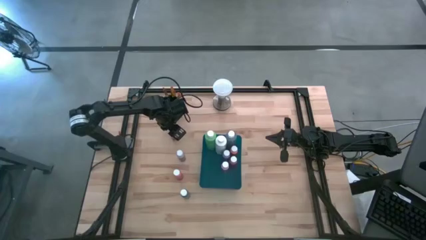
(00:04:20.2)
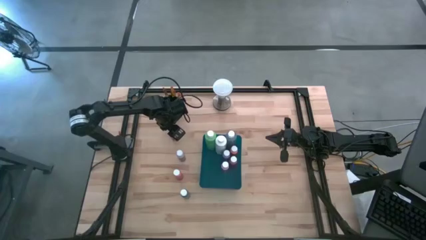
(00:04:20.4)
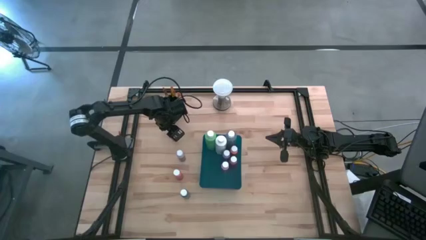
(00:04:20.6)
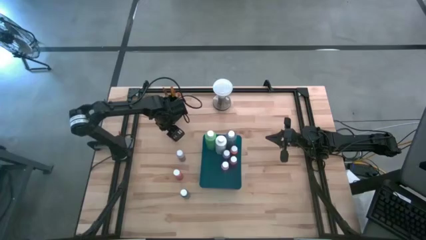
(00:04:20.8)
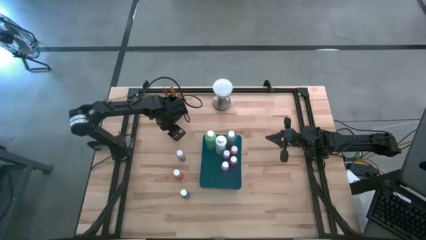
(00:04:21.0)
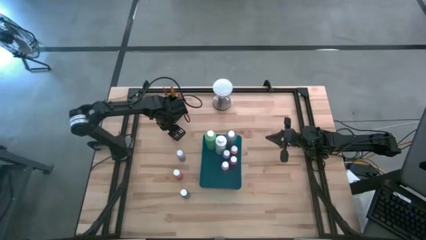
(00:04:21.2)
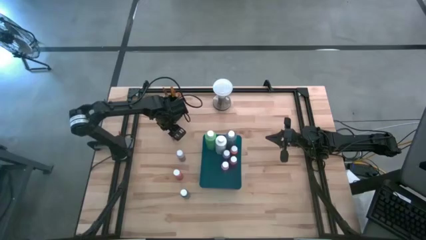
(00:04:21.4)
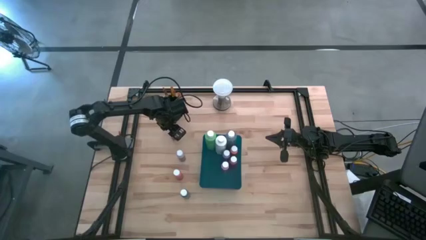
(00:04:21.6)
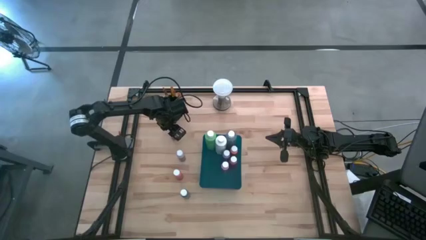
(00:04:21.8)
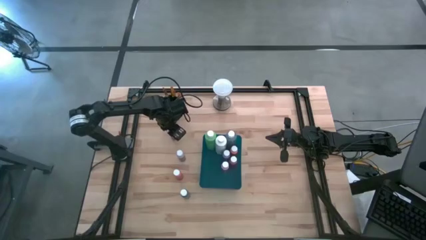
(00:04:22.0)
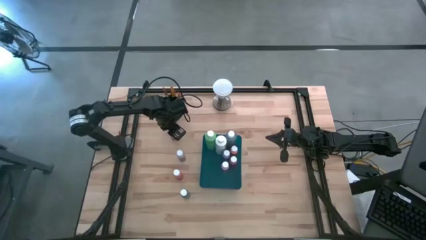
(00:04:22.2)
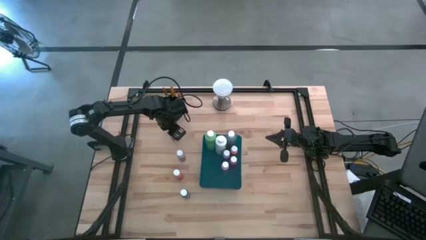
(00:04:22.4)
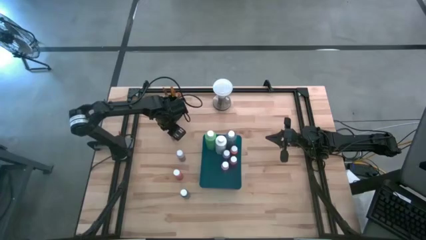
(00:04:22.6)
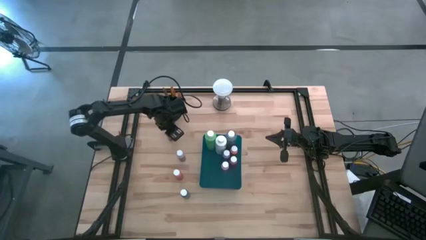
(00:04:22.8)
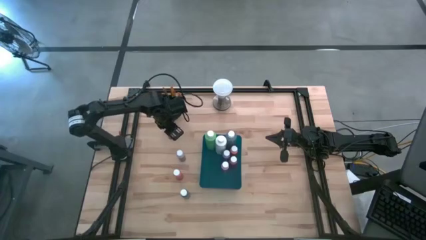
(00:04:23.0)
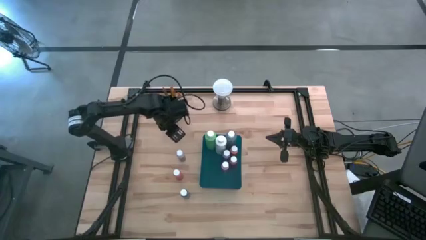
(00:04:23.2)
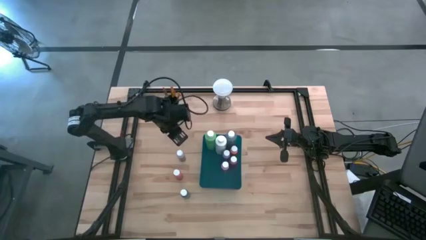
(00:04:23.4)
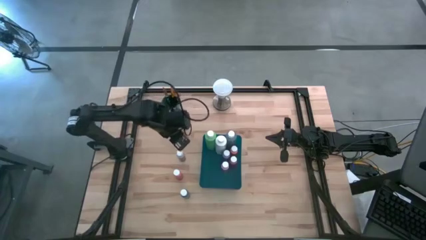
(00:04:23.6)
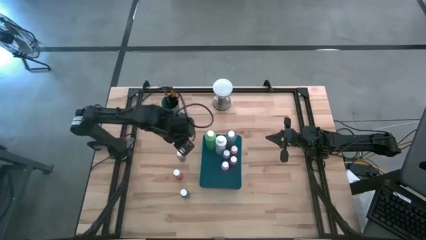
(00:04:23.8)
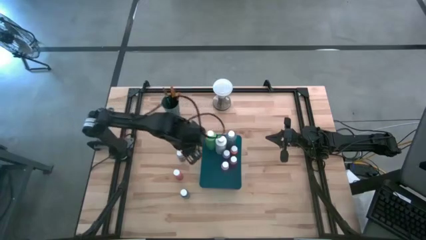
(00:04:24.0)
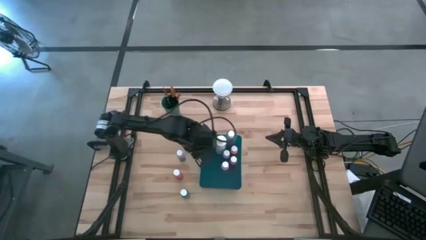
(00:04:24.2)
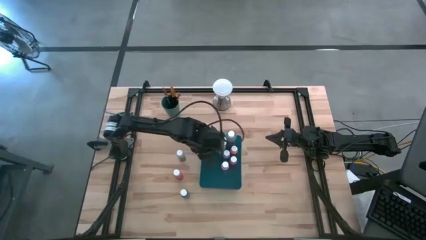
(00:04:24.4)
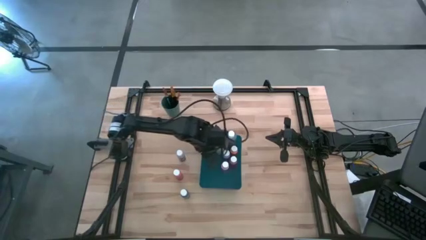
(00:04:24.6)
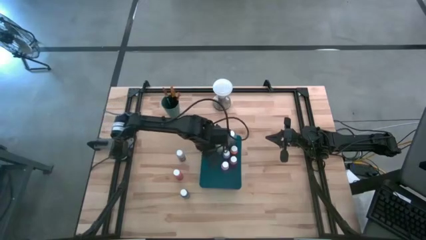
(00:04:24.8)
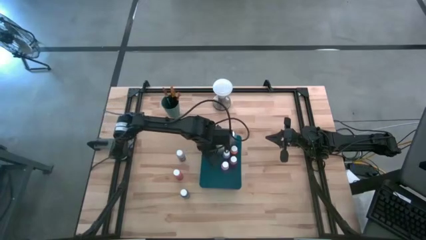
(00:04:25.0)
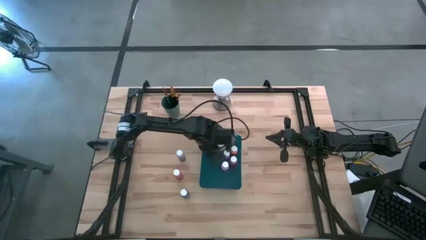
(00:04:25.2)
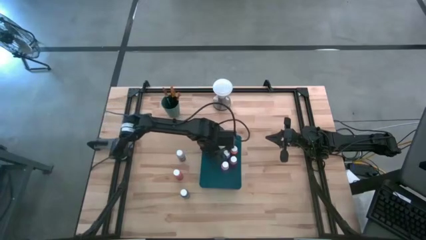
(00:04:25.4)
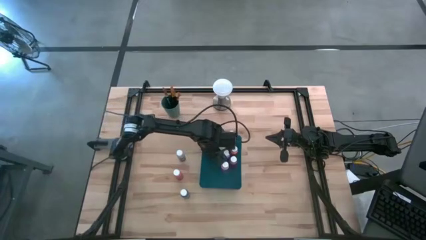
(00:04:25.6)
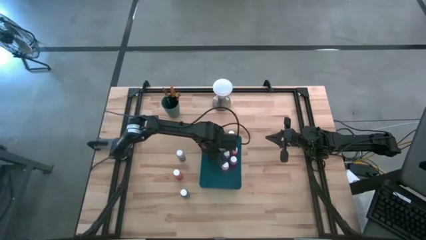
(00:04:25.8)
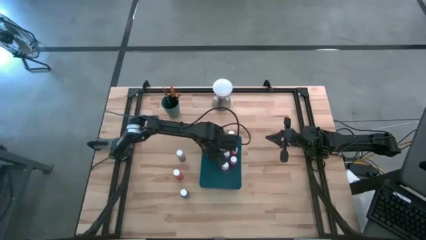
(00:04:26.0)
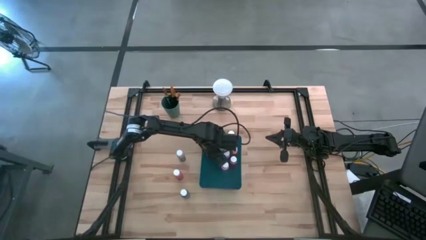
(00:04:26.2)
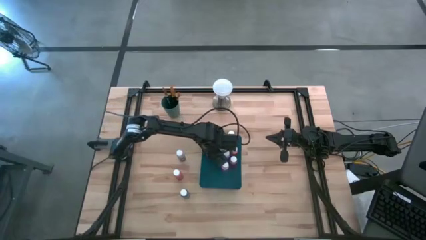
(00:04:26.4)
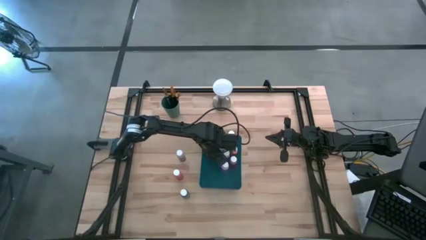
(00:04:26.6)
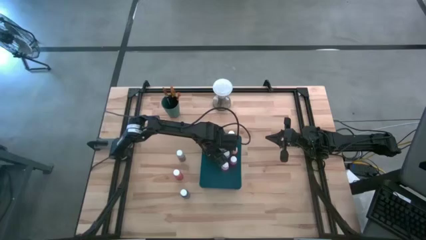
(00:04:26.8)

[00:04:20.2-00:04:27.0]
Task: Pick & Place Paint Supplies
Put the yellow paint bottle into the blue bin

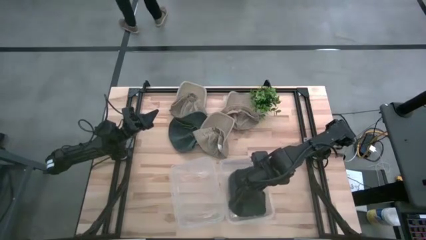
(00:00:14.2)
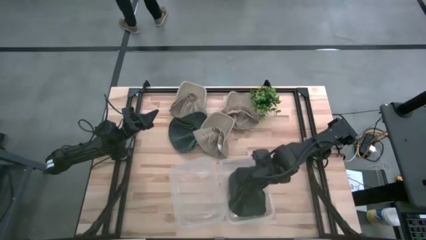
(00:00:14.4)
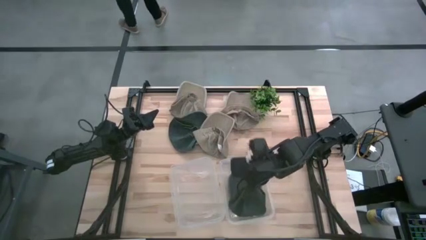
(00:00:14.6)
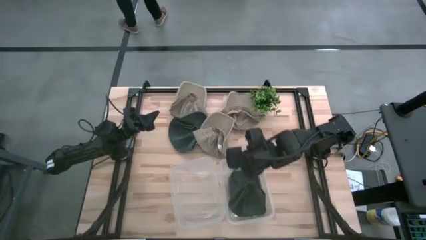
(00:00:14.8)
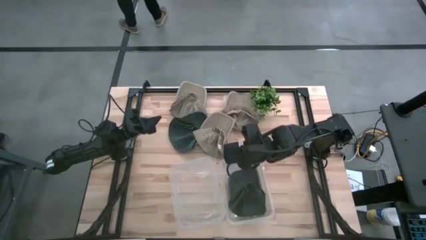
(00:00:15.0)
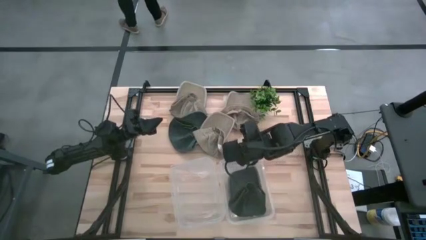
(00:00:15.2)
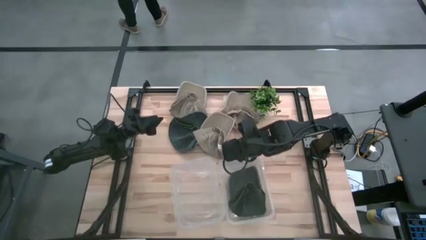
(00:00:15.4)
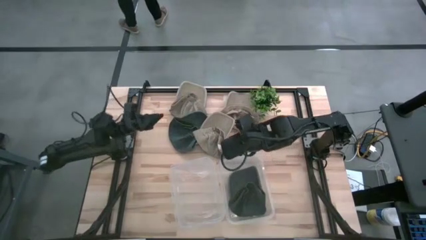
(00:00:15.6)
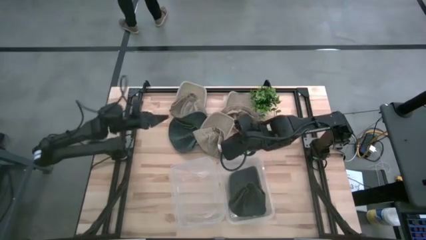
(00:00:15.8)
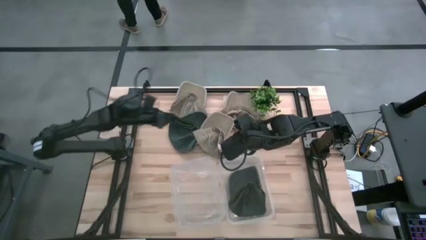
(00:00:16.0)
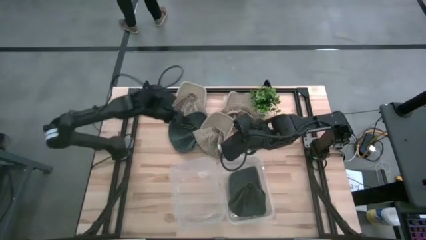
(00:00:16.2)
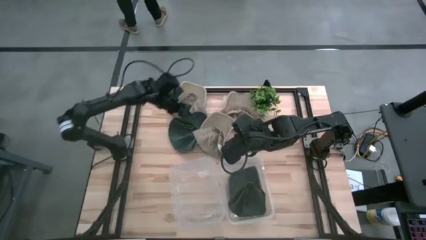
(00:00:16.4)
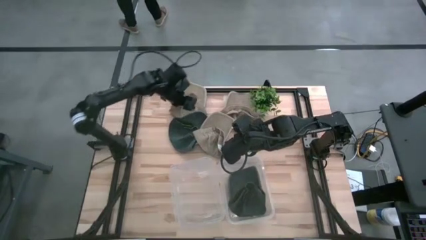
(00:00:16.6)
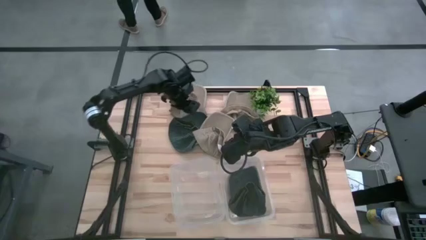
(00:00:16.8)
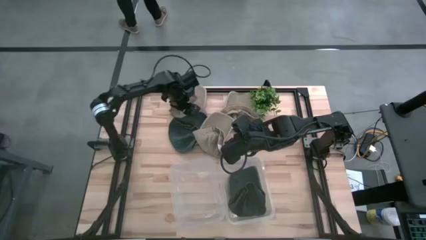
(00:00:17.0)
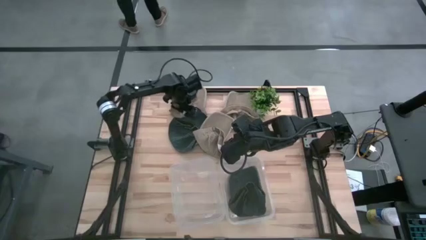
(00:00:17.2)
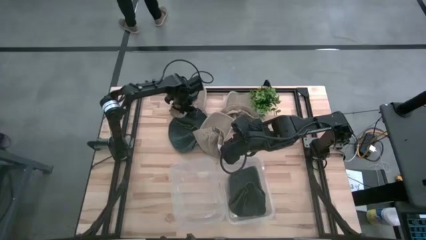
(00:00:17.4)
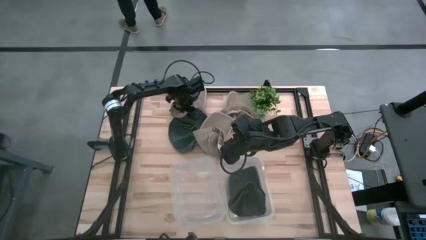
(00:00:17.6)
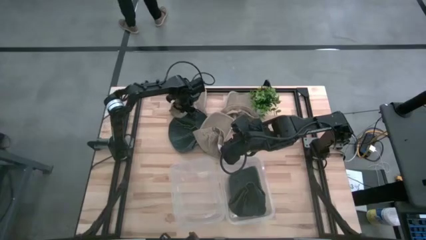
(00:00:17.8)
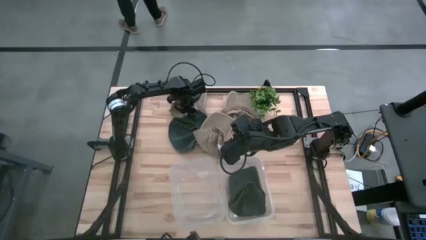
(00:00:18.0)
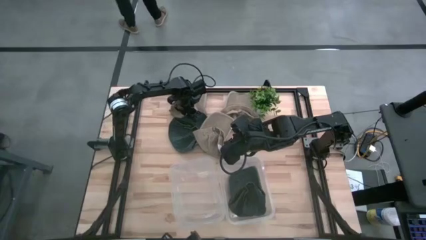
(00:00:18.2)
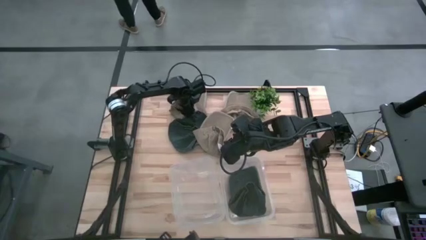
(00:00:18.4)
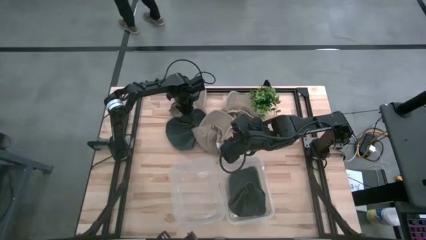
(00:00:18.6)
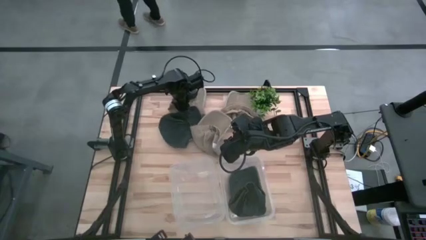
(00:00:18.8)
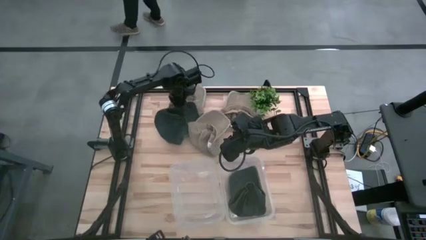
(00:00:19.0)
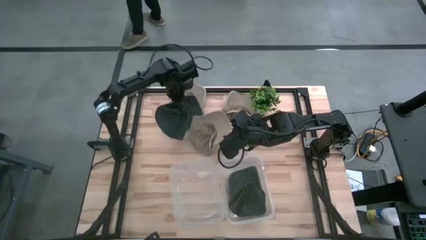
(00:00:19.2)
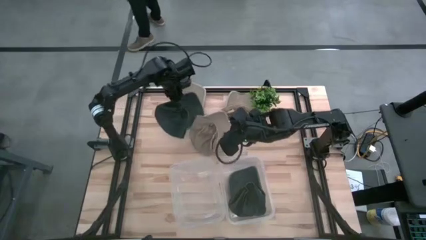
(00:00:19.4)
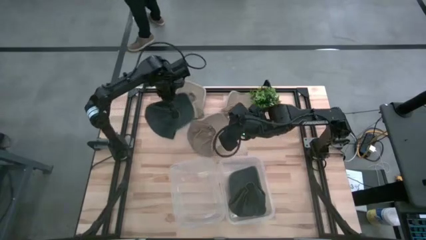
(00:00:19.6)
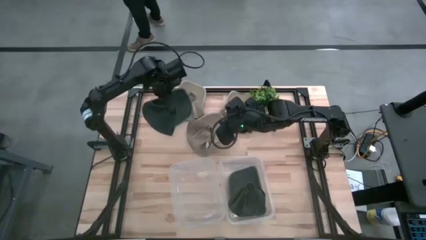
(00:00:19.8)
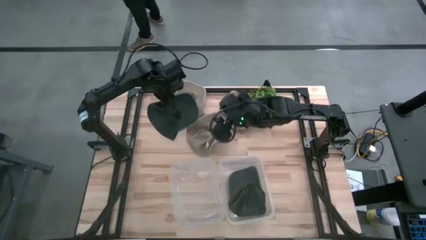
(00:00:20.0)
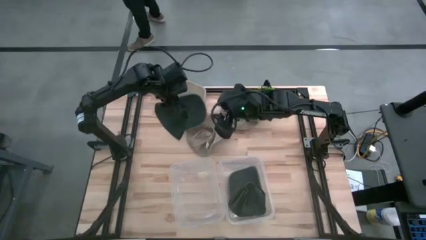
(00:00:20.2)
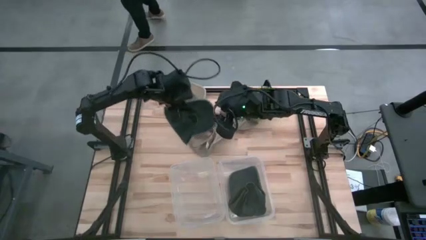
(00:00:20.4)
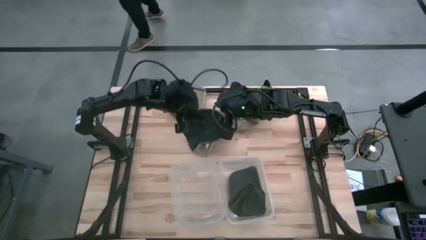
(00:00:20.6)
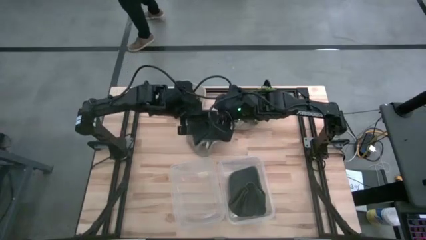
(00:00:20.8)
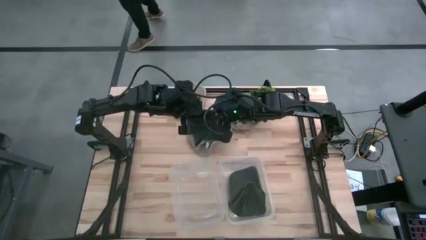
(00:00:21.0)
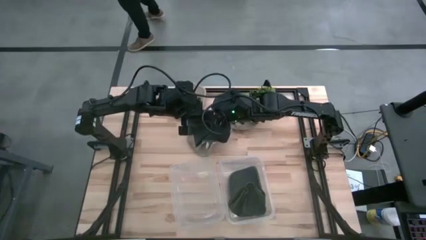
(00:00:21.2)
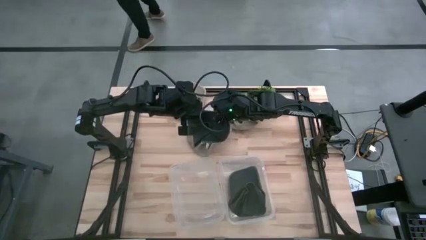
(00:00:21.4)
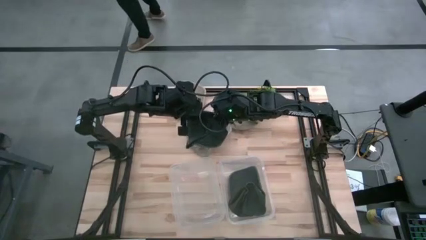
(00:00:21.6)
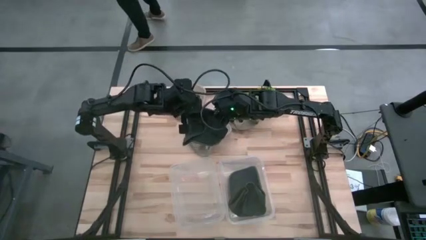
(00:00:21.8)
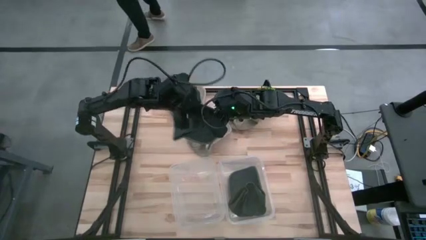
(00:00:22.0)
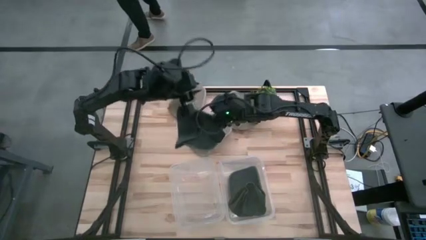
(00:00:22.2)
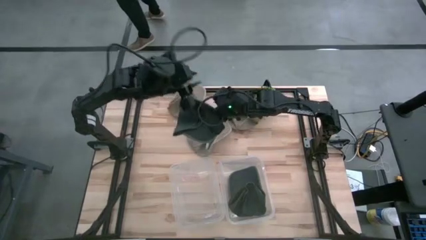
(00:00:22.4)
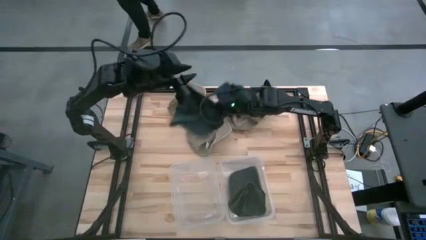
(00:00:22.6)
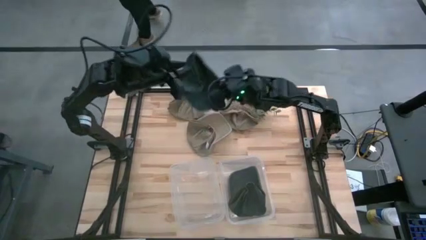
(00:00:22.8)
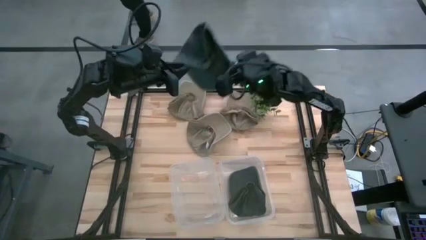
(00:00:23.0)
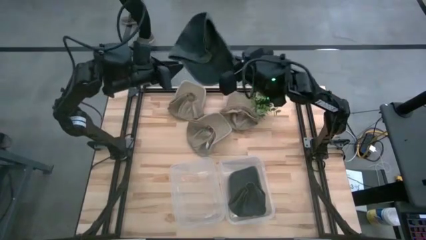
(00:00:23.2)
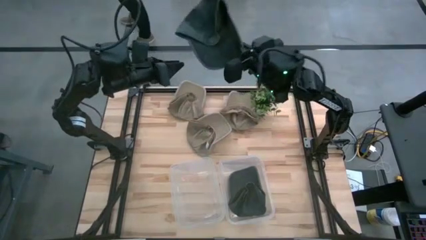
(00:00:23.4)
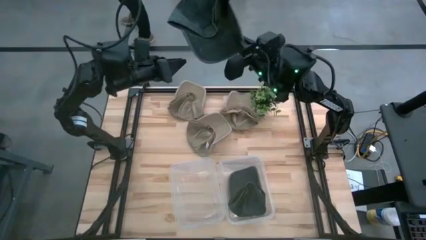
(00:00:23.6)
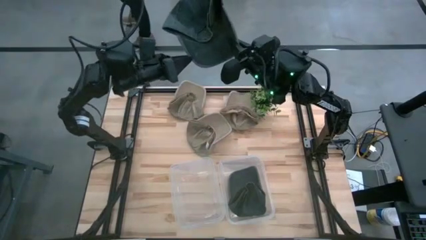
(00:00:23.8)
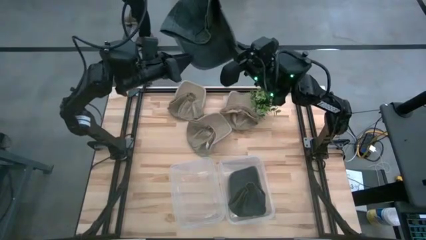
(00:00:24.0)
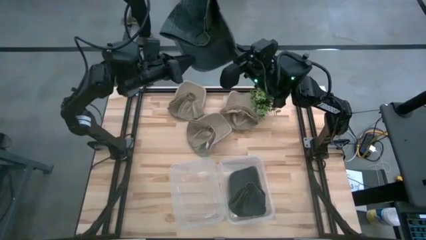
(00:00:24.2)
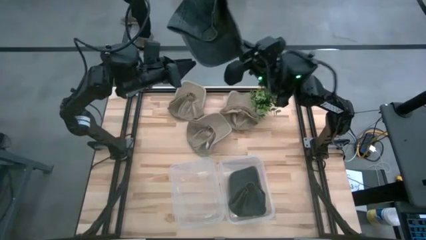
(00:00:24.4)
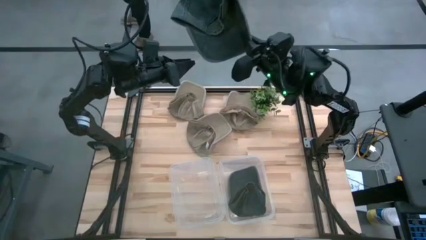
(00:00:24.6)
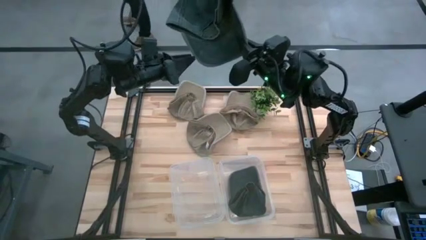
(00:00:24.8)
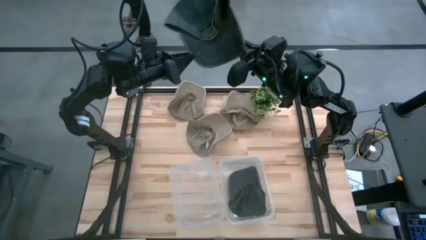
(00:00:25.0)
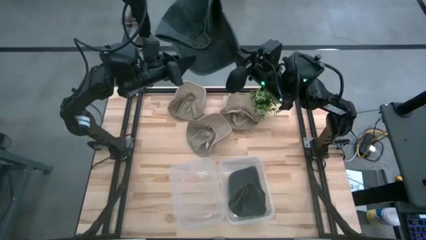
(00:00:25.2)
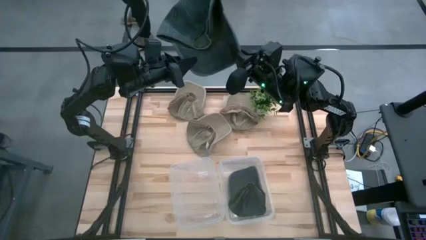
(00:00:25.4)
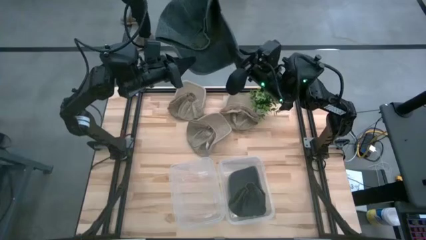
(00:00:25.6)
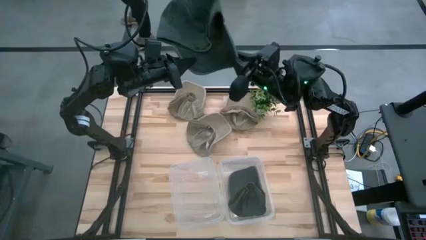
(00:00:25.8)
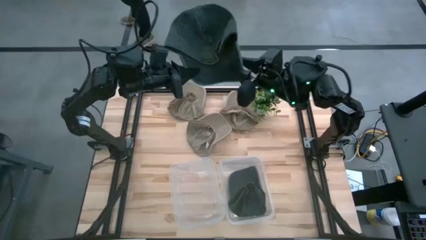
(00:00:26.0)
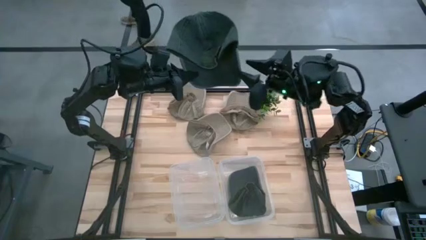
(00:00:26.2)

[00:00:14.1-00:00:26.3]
Task: Pick & Place hat
Put the black cap into the right transparent bin
